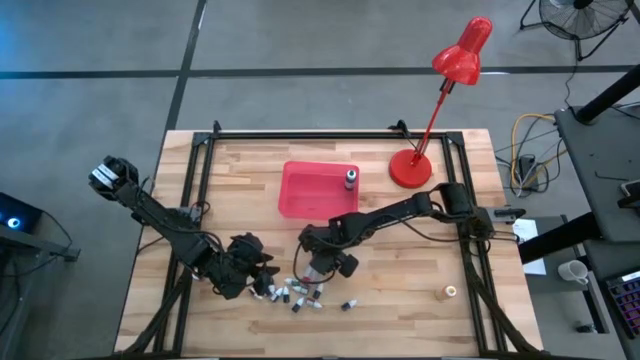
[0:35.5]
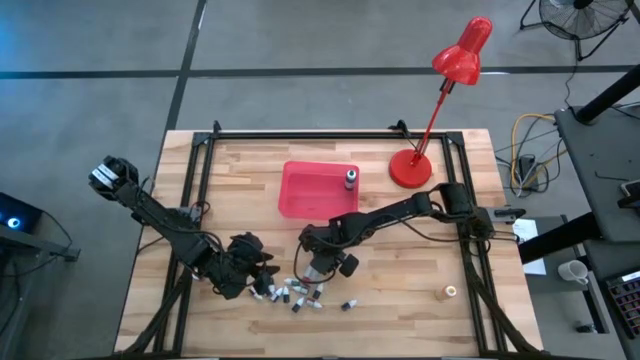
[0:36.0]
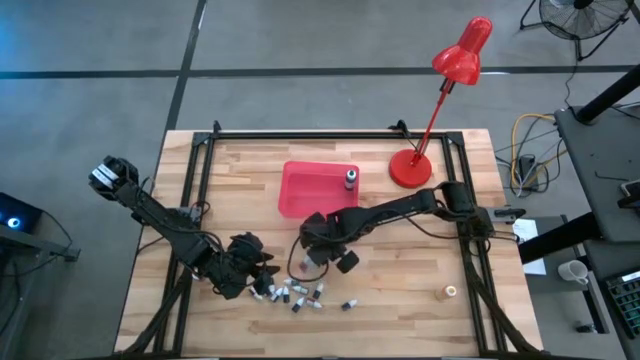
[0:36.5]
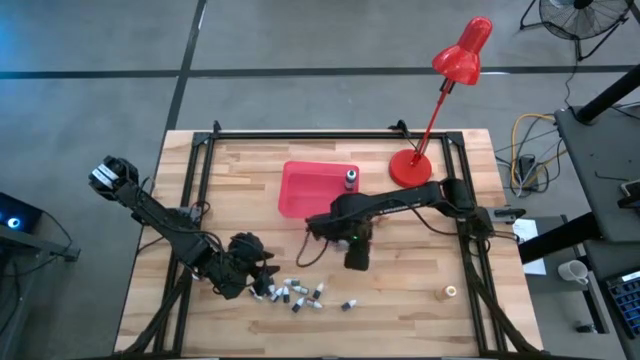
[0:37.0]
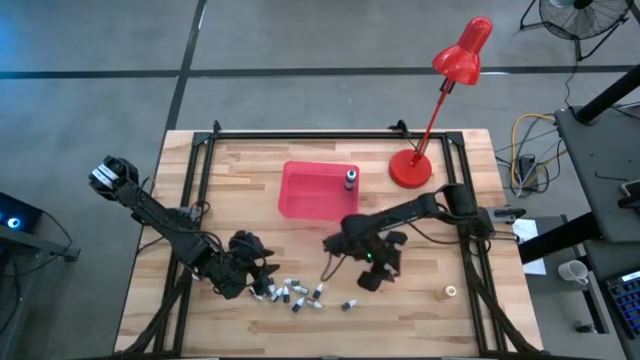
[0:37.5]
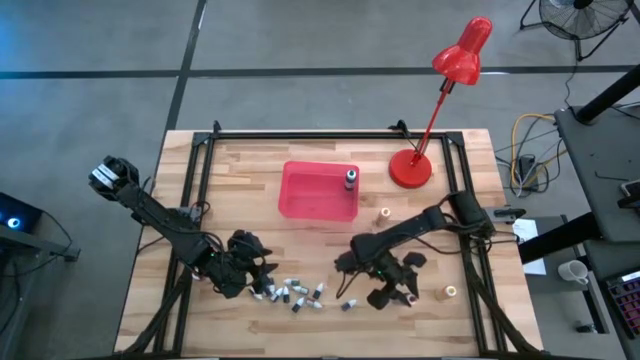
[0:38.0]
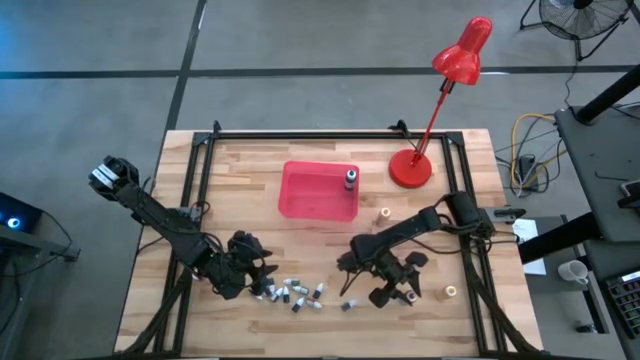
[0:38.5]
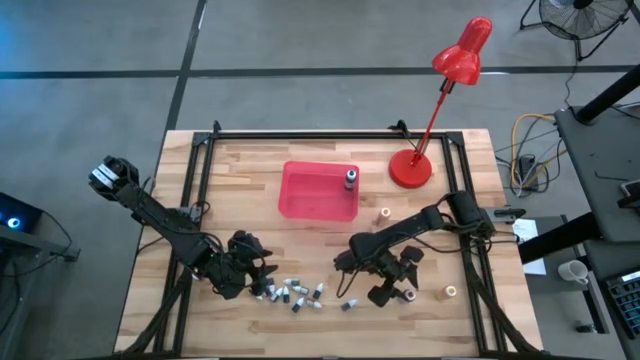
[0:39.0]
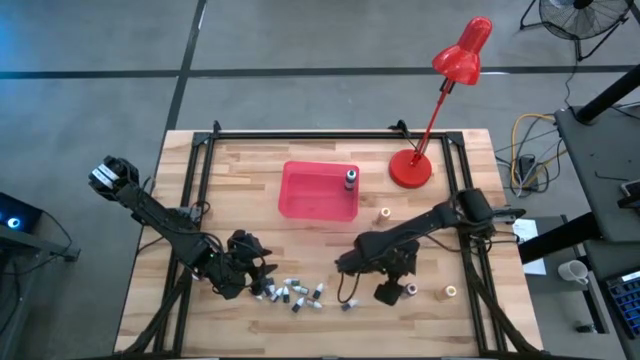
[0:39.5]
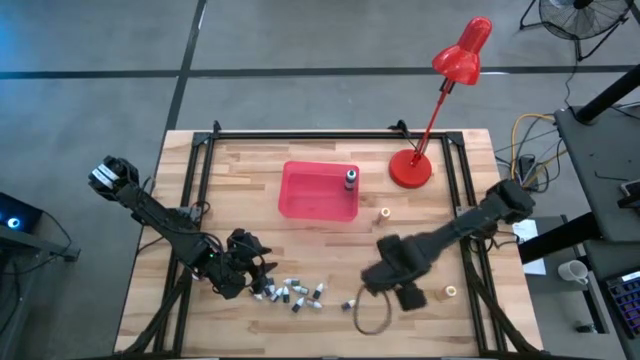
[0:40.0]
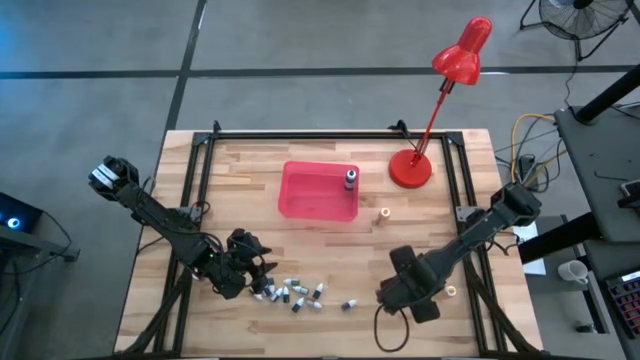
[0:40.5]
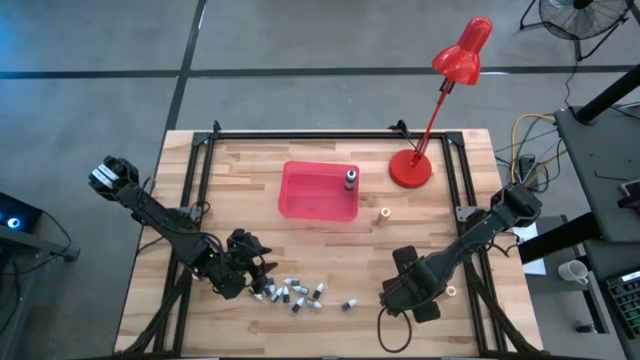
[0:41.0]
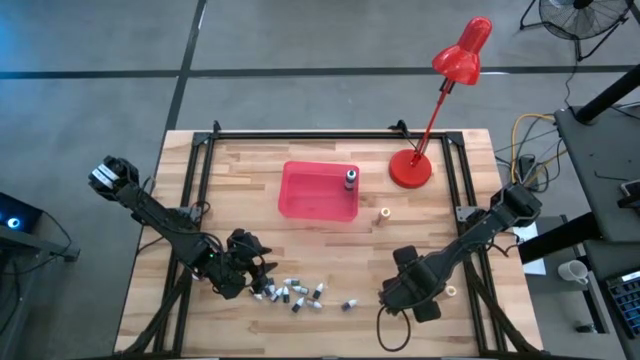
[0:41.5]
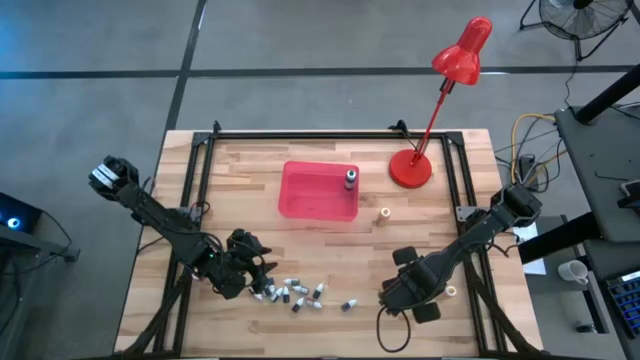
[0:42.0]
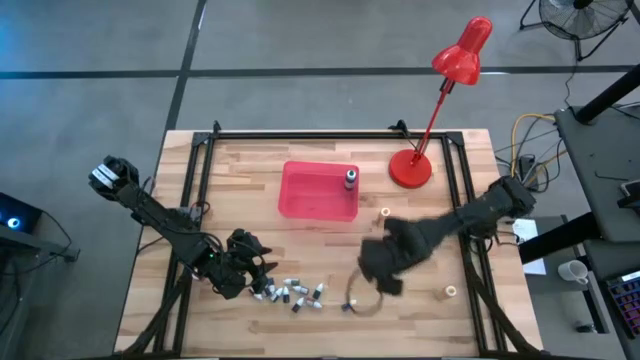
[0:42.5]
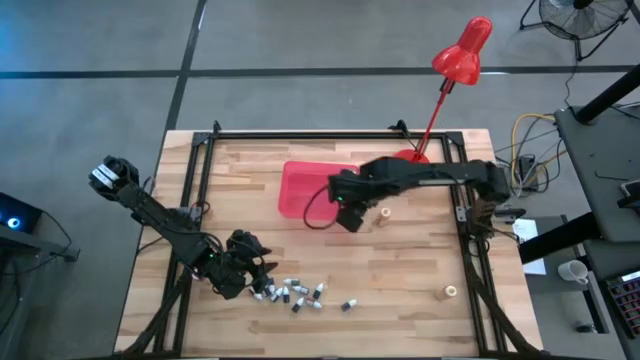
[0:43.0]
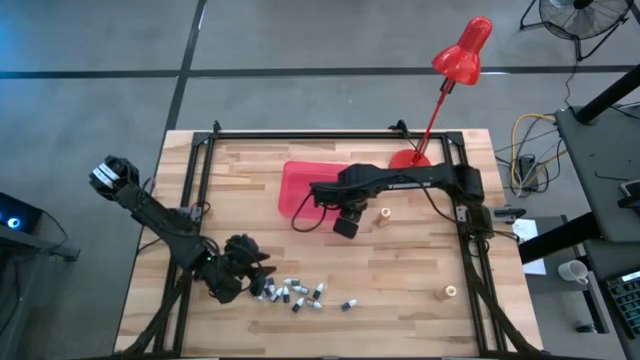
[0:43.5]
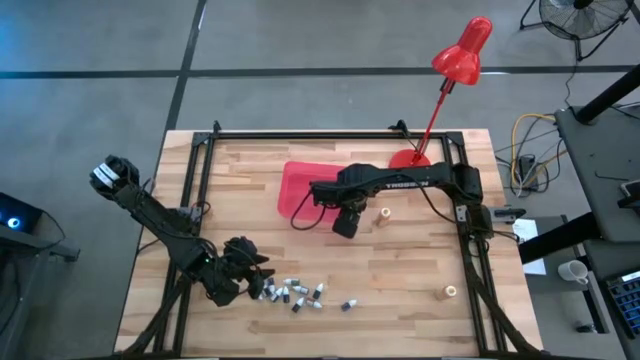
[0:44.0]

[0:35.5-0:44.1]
Task: Pick & Place food coloring
Put the big red food coloring bottle into the pink bin

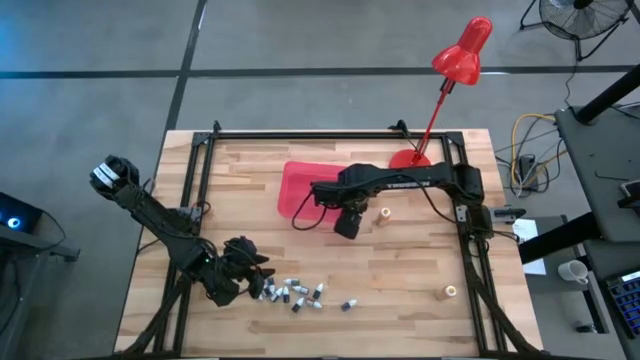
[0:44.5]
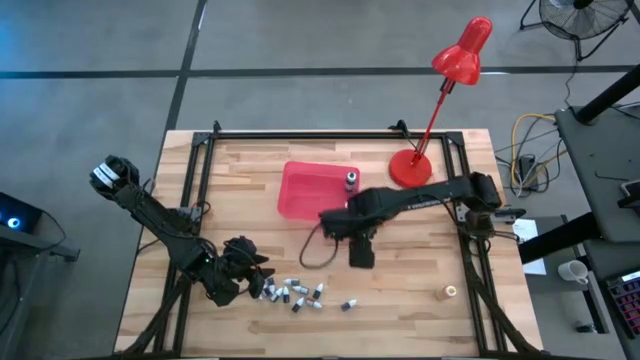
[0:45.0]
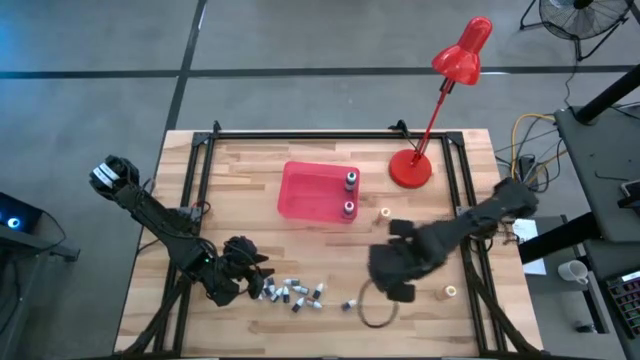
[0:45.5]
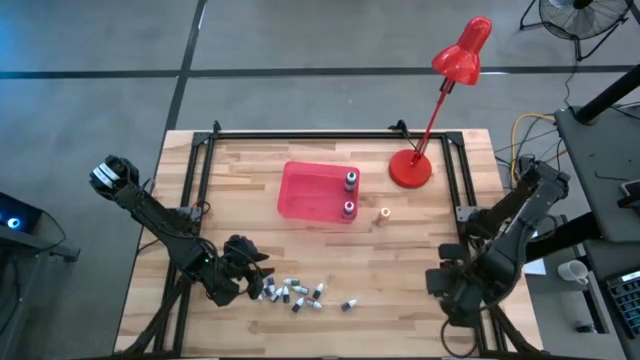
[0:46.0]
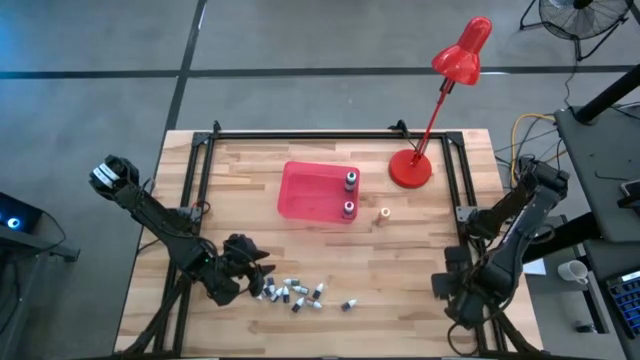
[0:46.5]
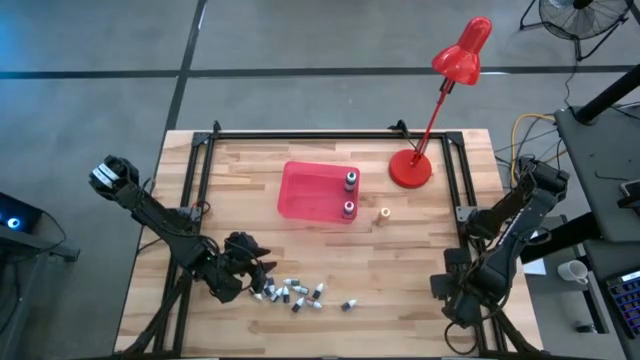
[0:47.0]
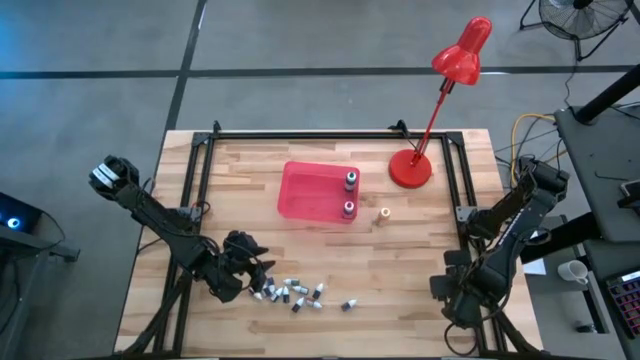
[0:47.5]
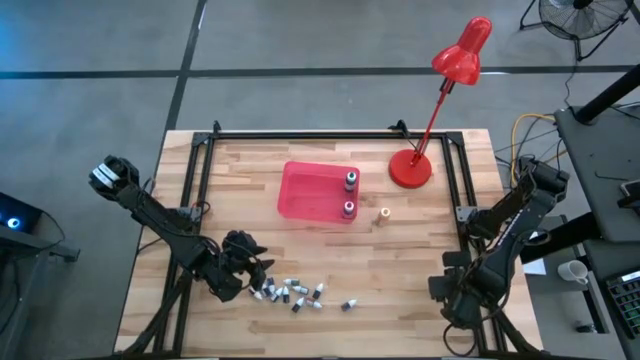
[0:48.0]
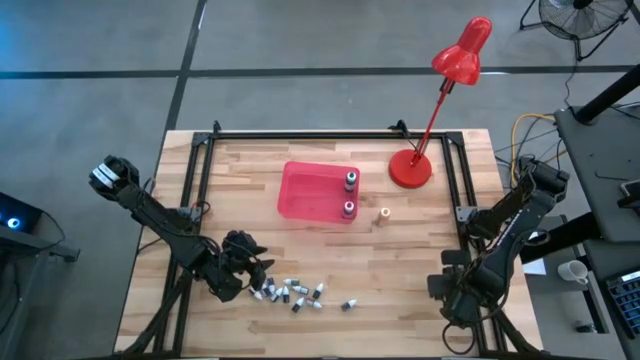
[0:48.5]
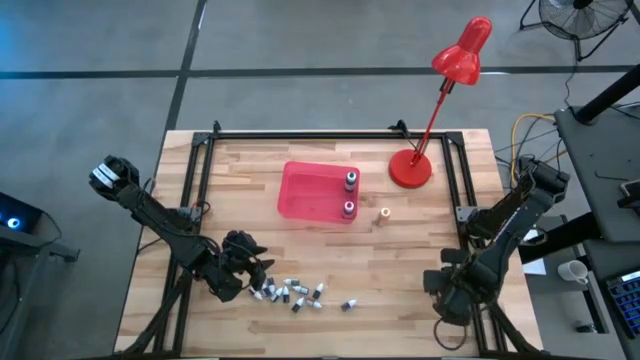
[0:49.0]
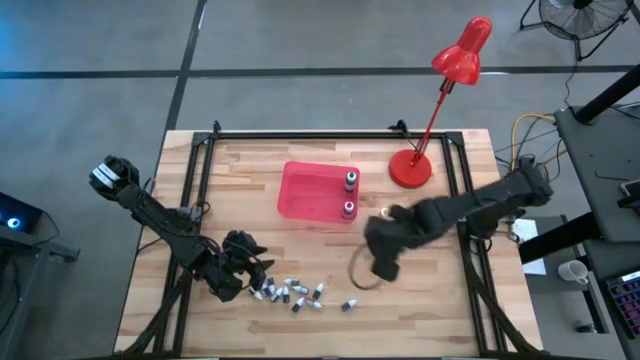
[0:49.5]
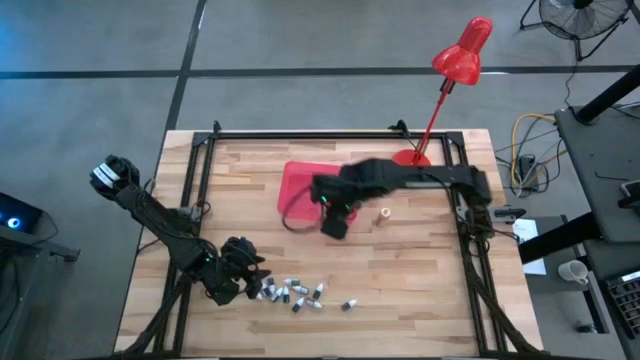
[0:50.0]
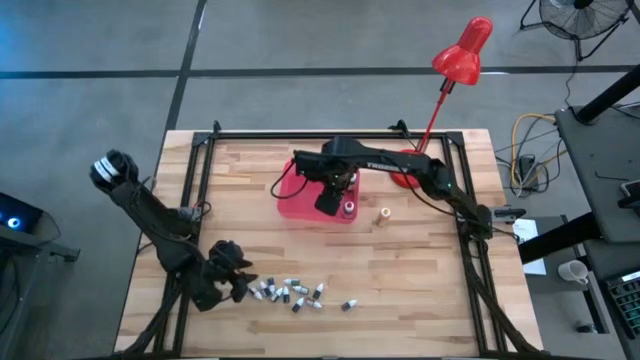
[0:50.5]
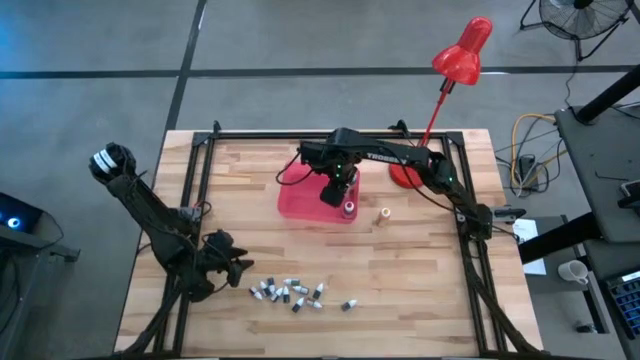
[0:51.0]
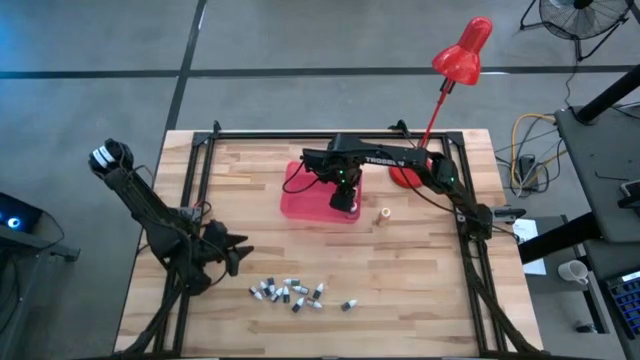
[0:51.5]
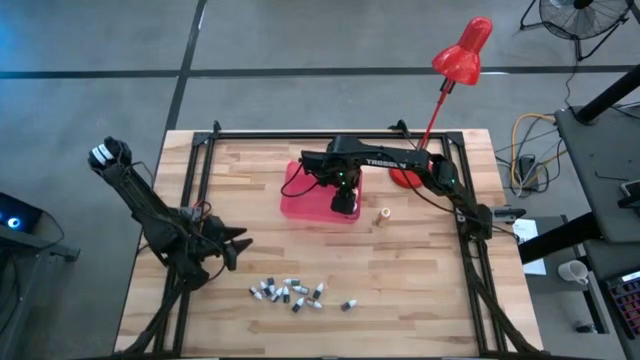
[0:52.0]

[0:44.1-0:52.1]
Put the big yellow food coloring bottle into the pink bin

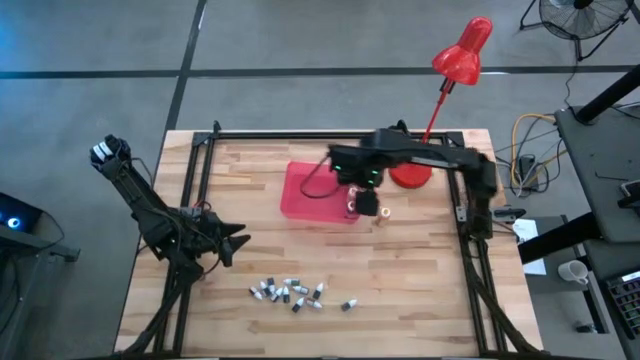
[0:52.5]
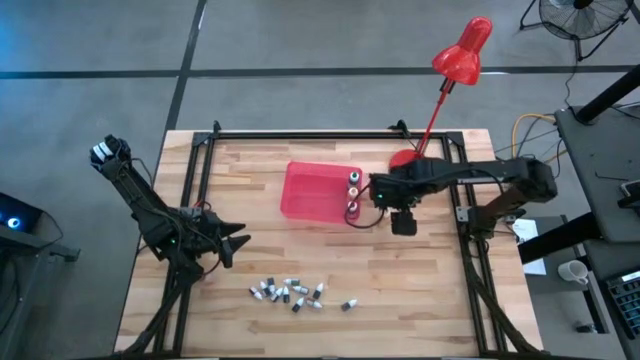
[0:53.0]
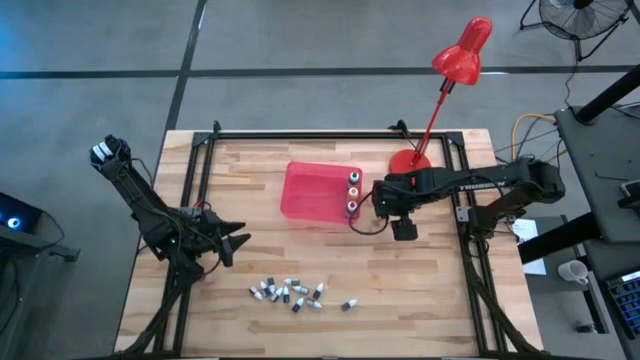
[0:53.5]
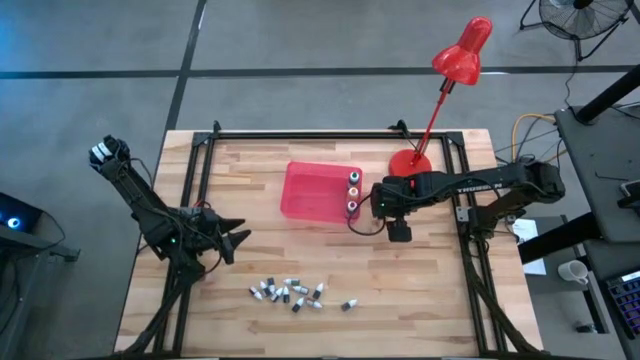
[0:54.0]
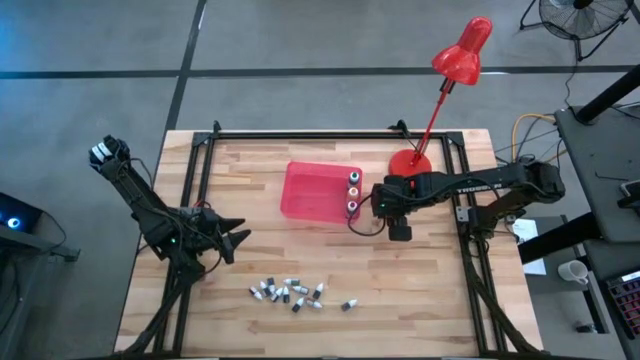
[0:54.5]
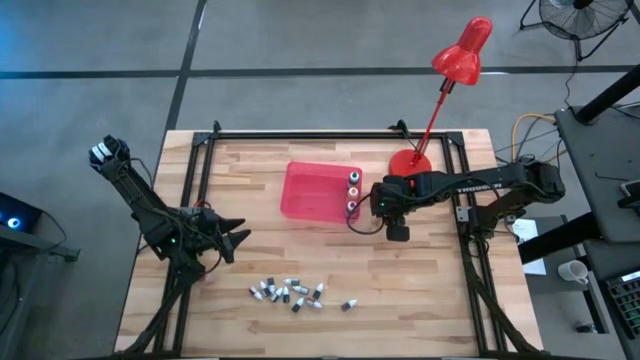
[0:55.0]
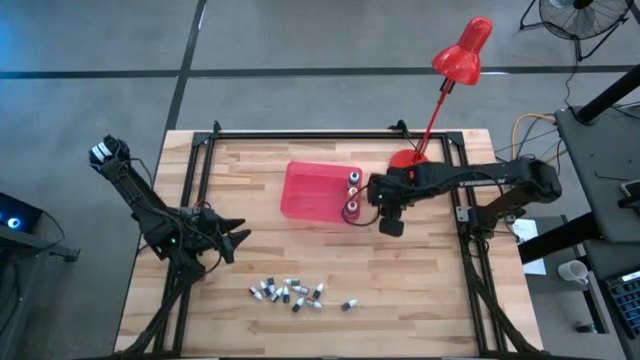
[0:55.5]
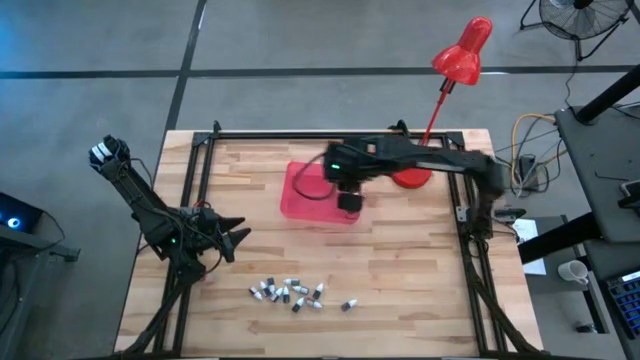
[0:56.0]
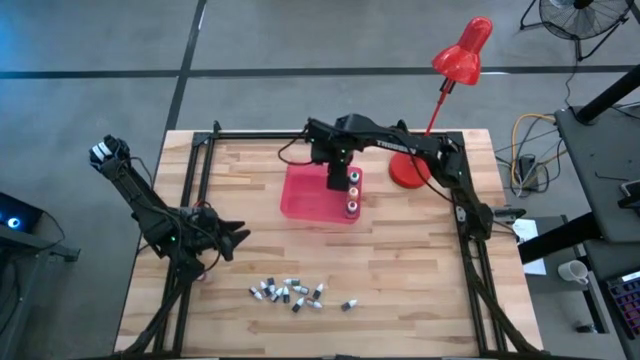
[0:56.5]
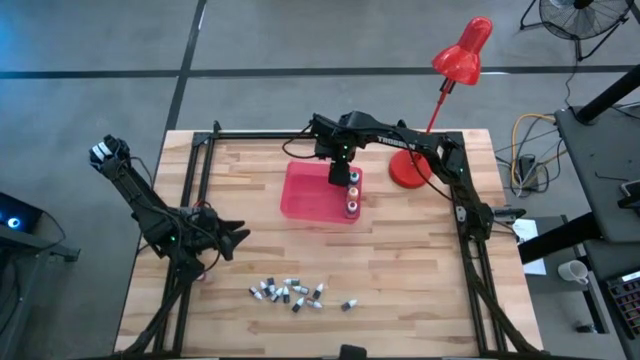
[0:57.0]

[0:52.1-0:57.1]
Put the big yellow food coloring bottle into the pink bin
